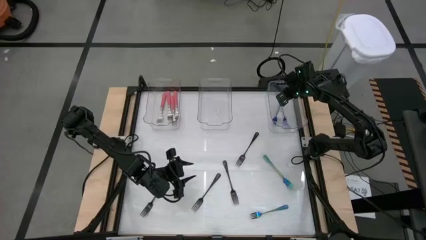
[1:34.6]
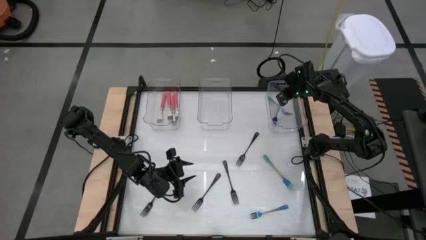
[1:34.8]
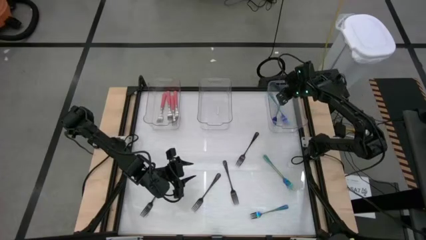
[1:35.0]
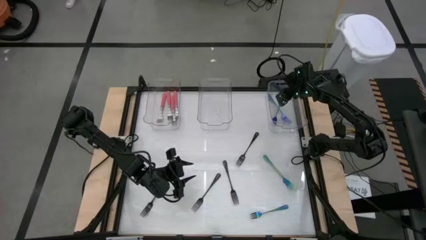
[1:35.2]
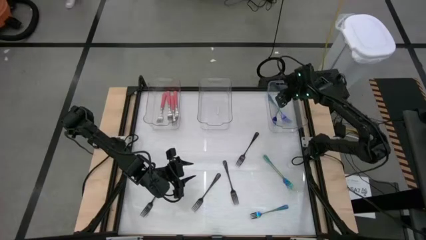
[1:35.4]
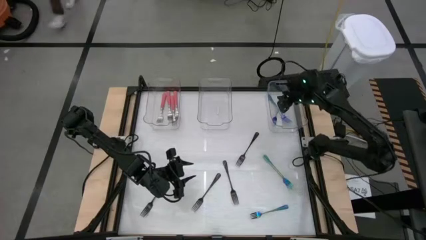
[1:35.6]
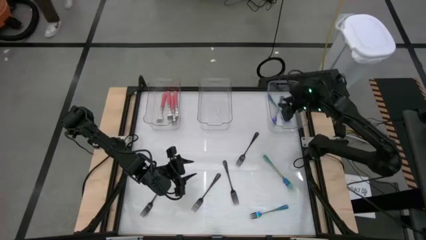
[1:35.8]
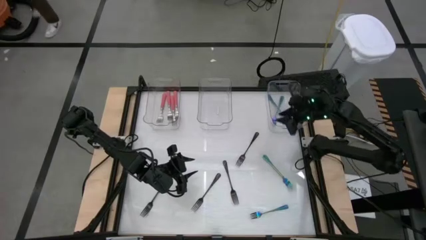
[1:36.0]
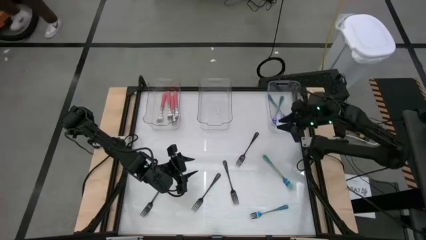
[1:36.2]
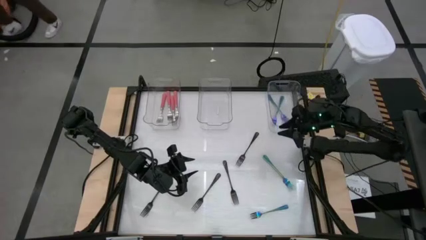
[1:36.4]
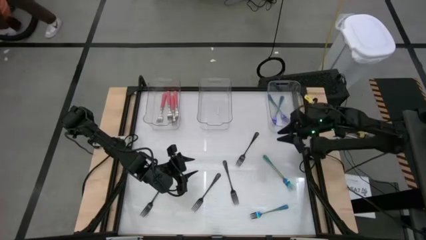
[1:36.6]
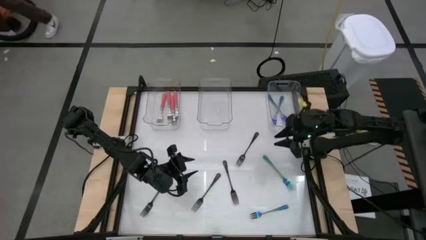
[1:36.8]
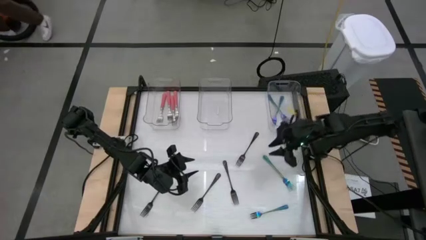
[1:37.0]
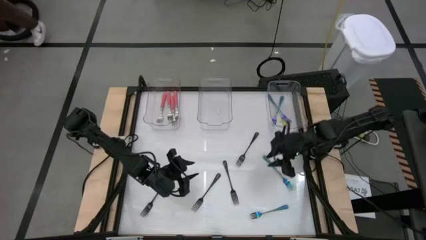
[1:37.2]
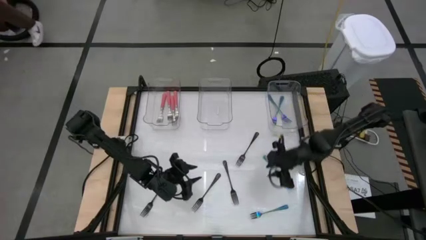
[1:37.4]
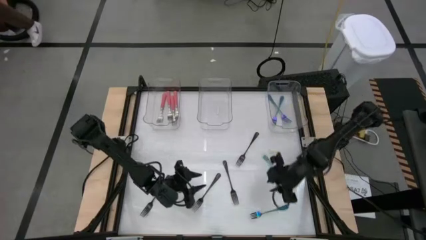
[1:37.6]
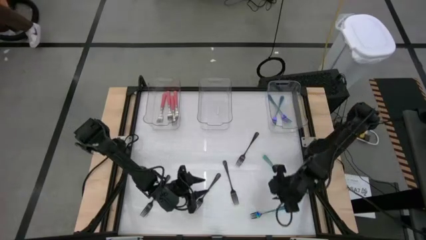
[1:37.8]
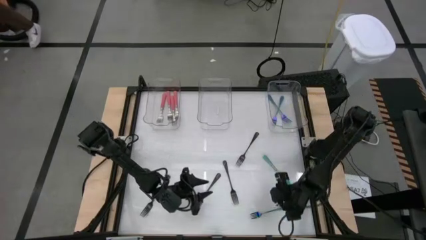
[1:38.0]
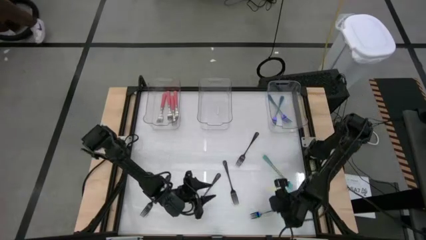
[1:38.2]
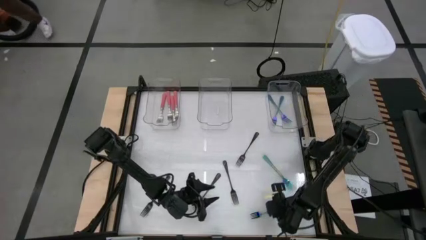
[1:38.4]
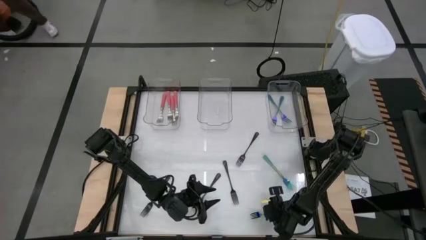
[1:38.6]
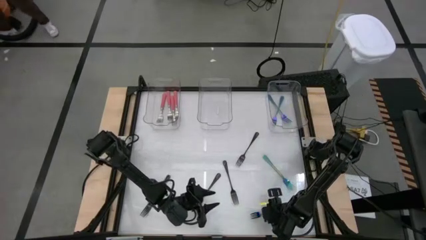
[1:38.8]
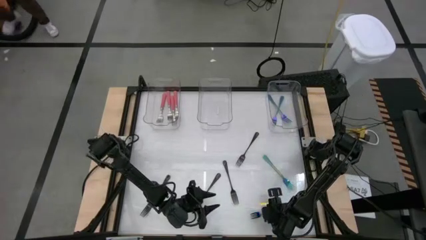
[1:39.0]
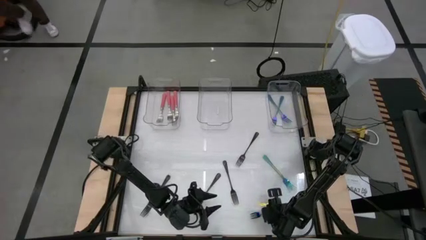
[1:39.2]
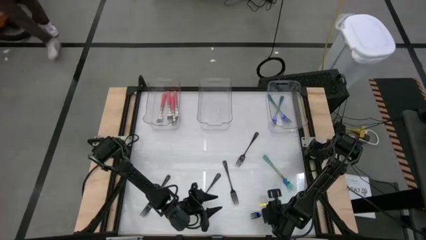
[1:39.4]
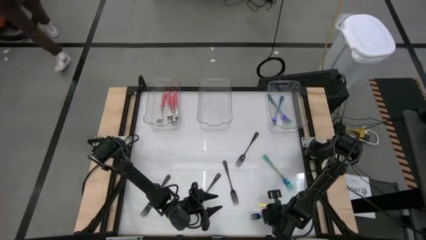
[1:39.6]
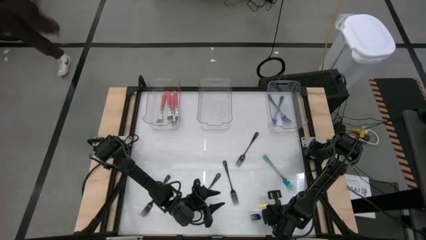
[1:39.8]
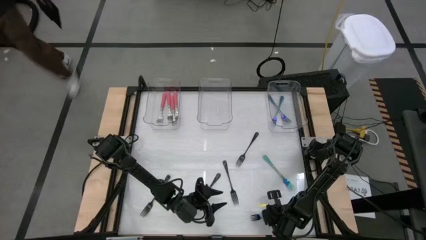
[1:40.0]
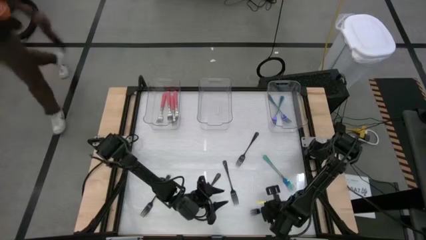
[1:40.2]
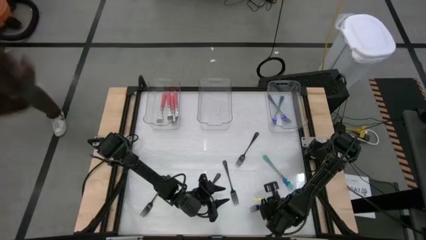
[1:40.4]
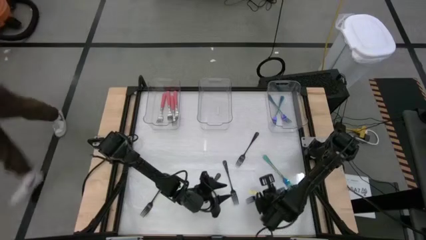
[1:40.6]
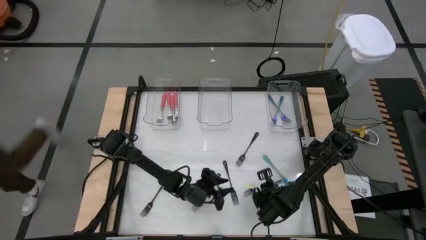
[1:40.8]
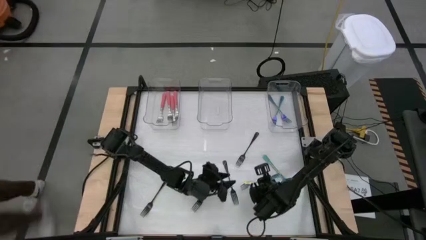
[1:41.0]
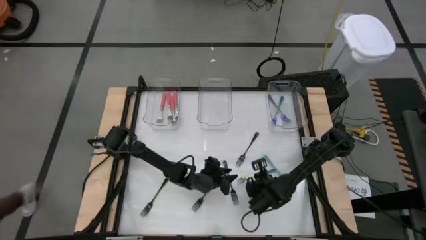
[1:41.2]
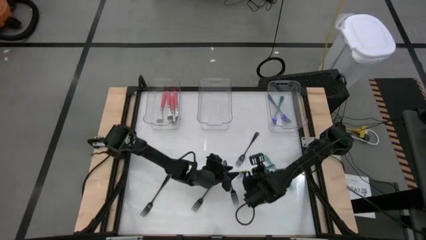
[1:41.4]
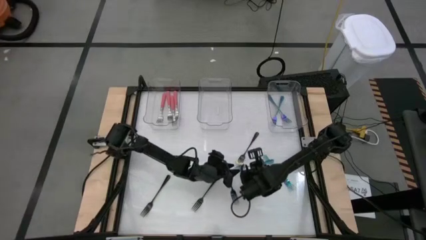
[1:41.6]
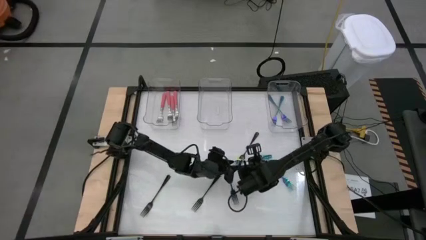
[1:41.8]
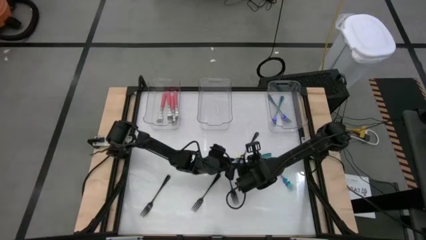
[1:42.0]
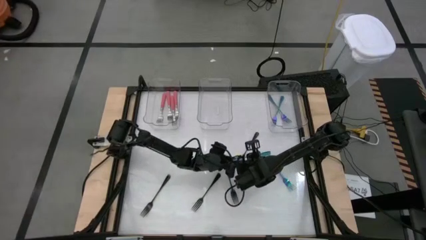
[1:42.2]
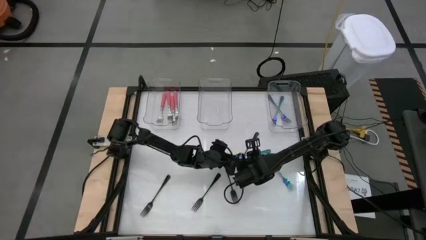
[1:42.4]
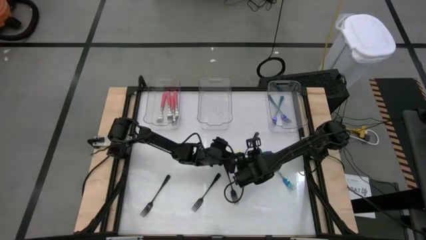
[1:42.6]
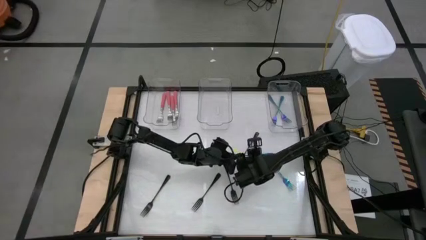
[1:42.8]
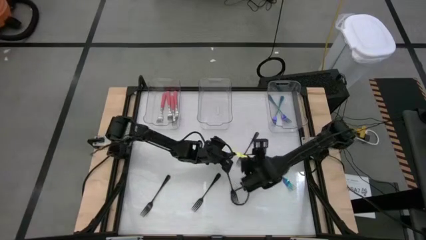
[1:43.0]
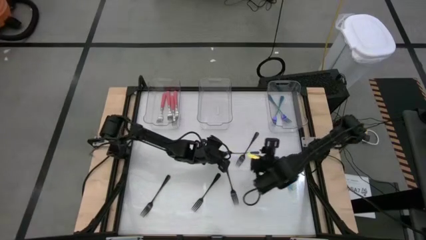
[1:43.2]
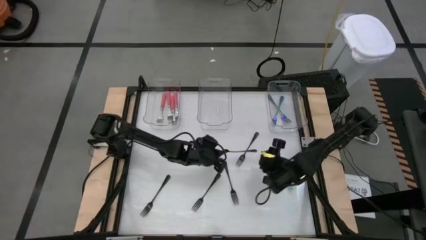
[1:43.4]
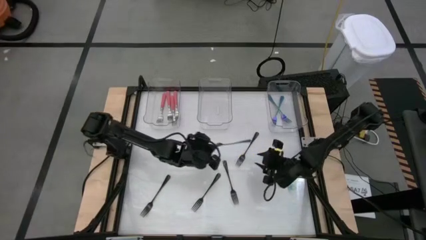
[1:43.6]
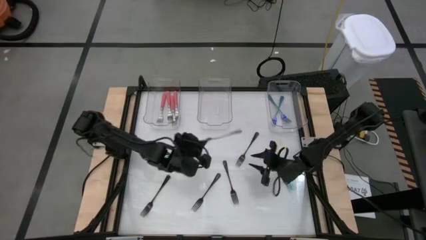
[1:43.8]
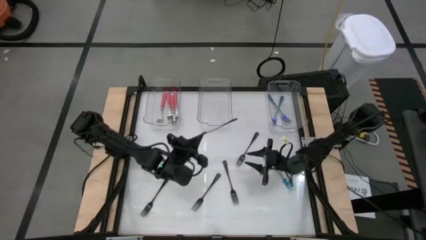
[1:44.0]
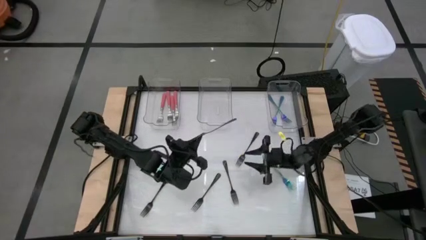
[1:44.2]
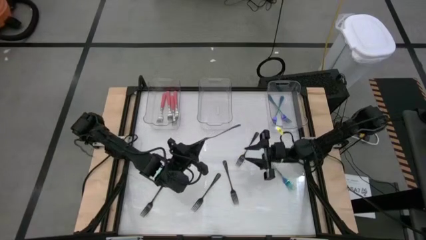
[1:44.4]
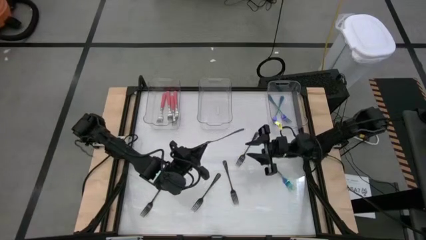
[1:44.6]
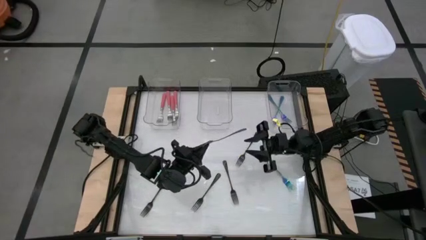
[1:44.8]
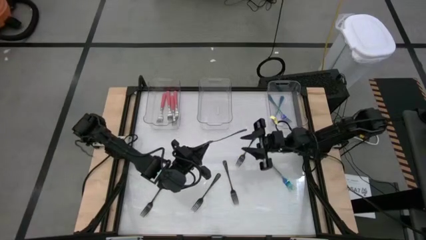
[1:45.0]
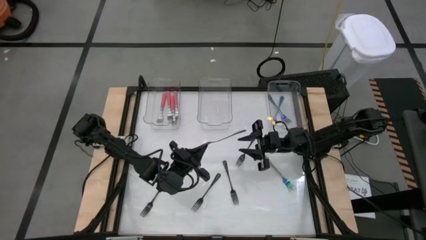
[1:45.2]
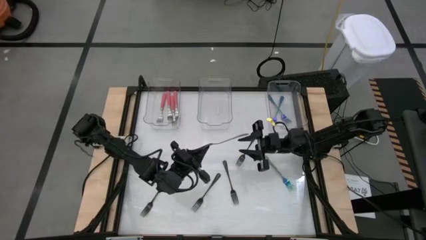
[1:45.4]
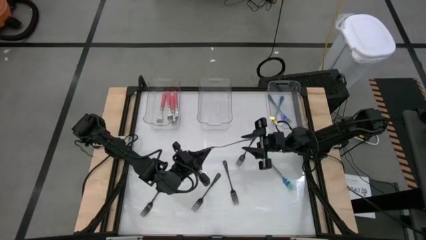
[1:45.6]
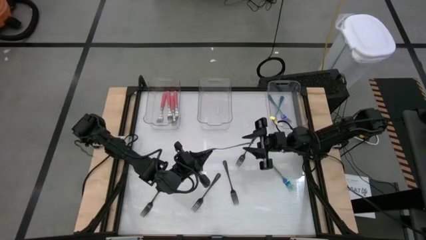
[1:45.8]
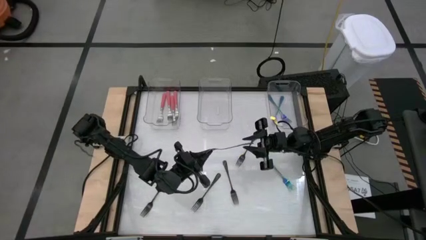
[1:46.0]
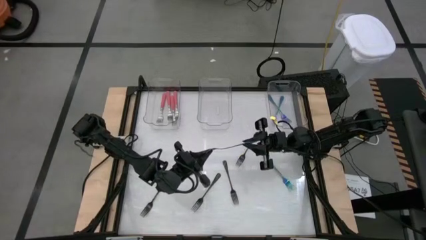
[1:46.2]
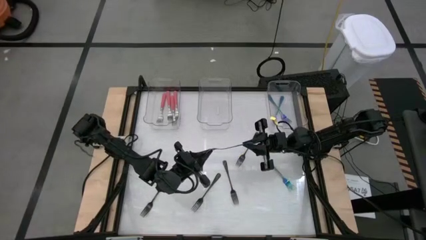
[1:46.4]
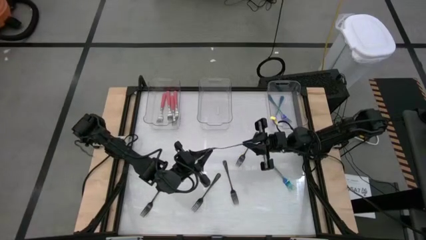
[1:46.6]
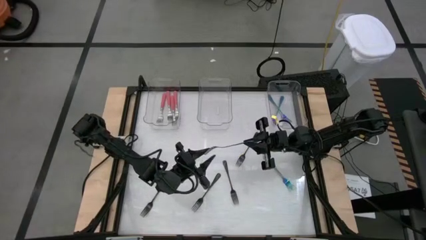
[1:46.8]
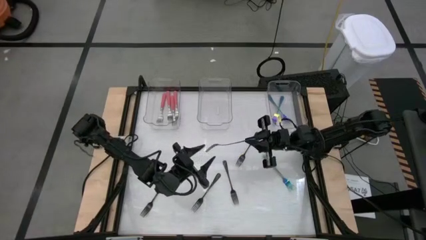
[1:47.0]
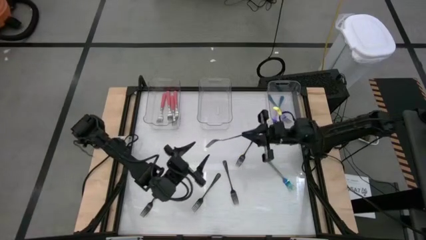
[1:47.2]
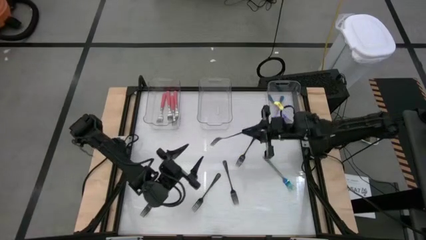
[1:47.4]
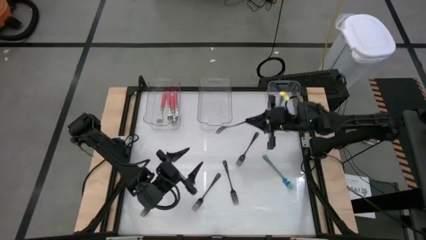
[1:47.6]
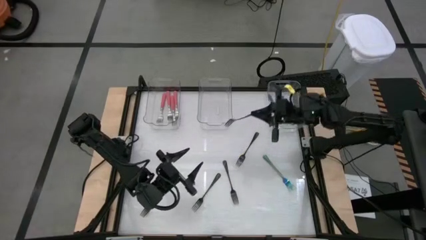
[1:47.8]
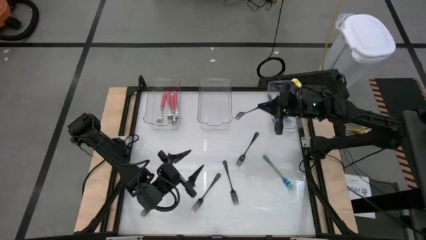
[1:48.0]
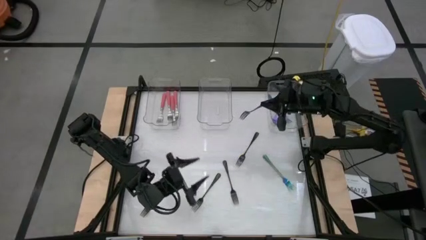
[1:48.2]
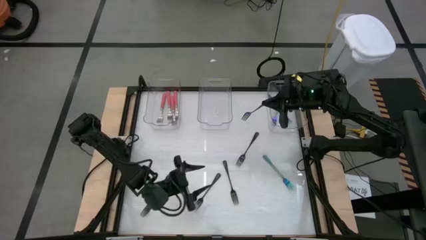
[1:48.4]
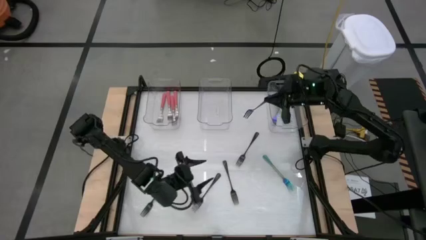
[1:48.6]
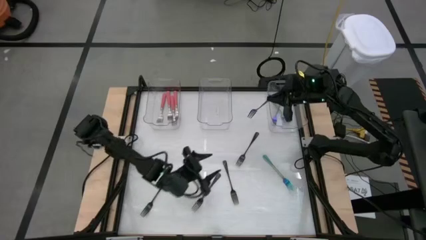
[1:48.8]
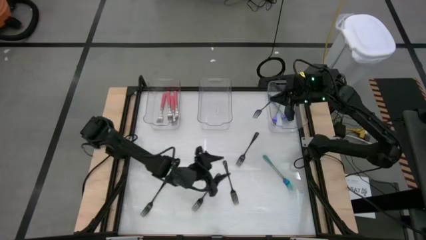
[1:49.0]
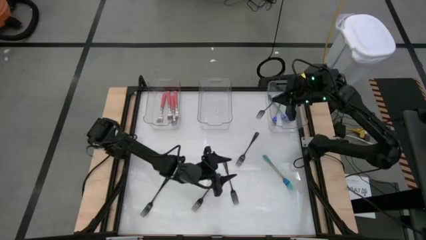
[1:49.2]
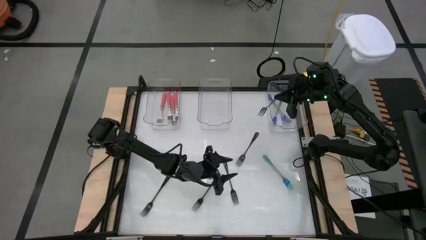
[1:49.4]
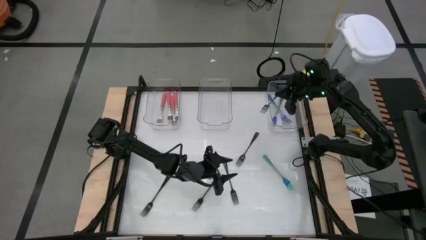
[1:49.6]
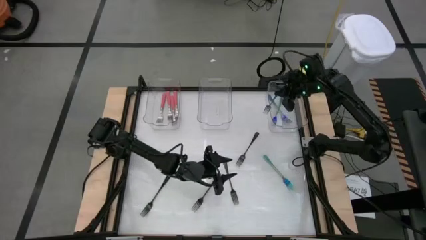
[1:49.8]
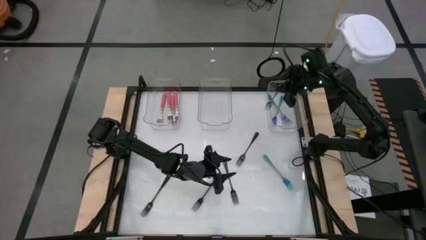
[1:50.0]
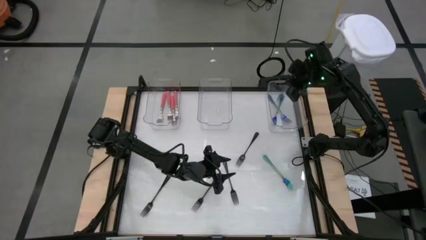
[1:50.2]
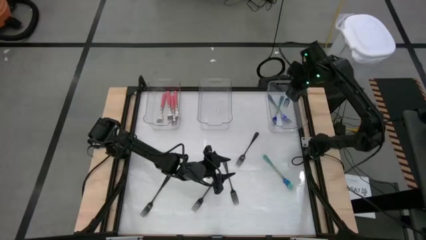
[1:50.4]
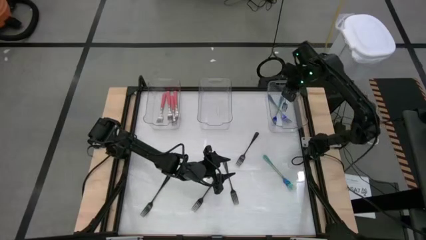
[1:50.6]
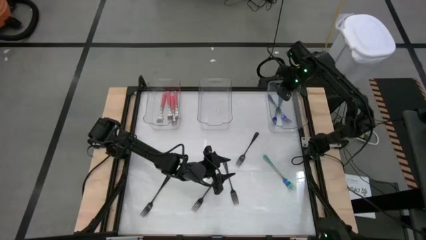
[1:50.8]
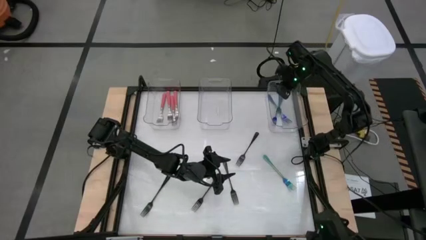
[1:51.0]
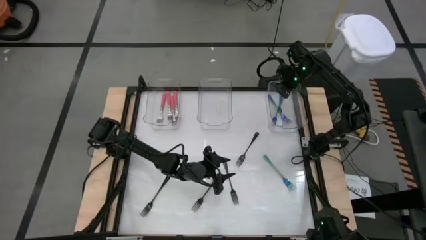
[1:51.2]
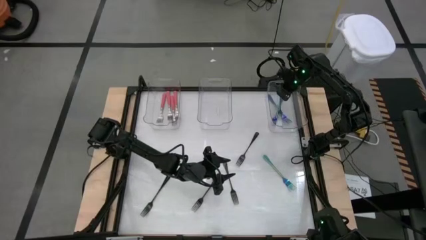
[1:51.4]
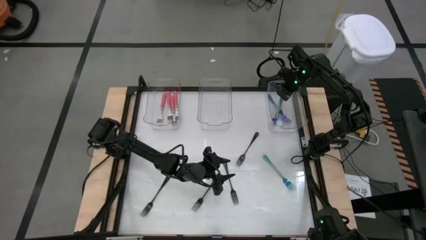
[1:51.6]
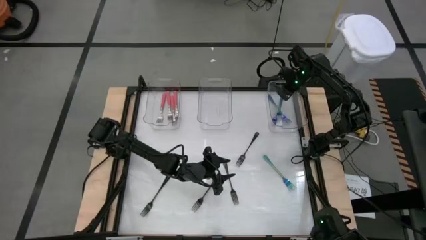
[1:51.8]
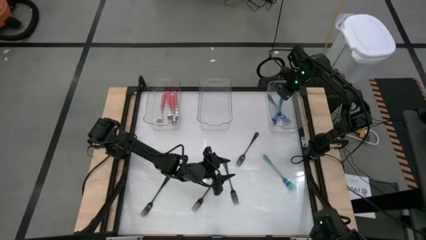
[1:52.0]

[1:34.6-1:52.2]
Task: Sort silverware by color (type)
Put the blue fork into the right transparent bin
